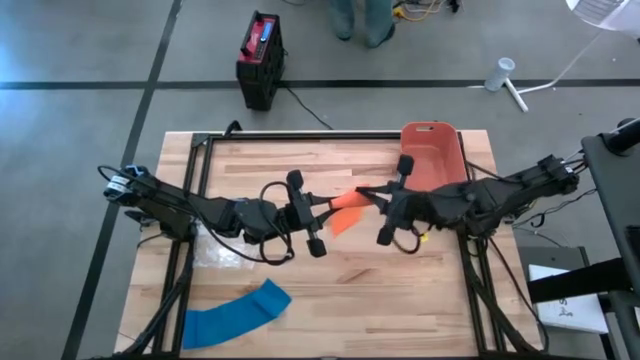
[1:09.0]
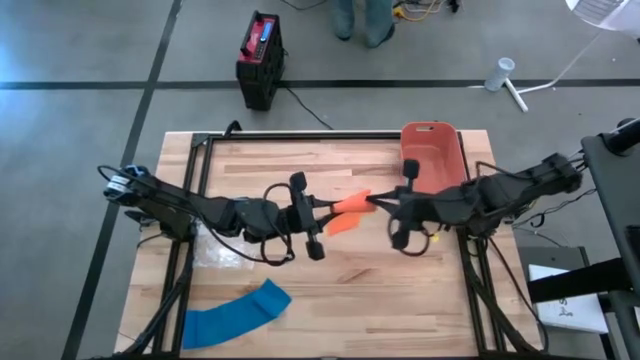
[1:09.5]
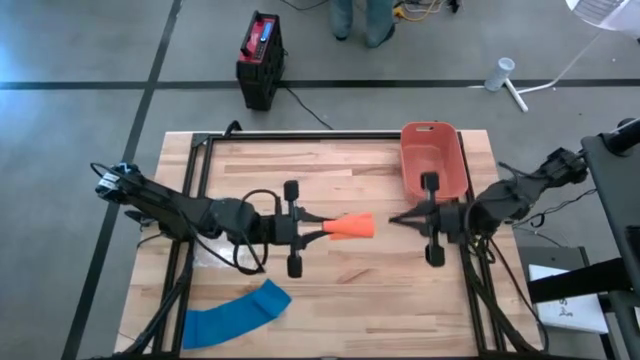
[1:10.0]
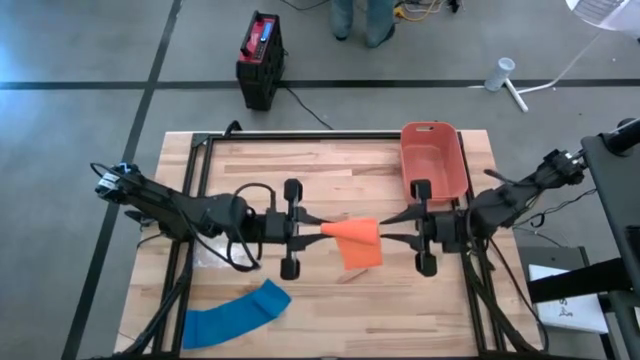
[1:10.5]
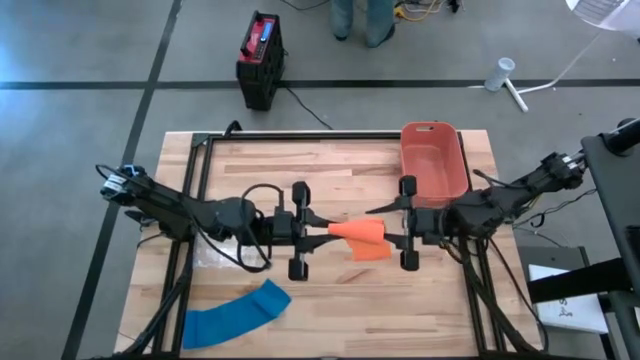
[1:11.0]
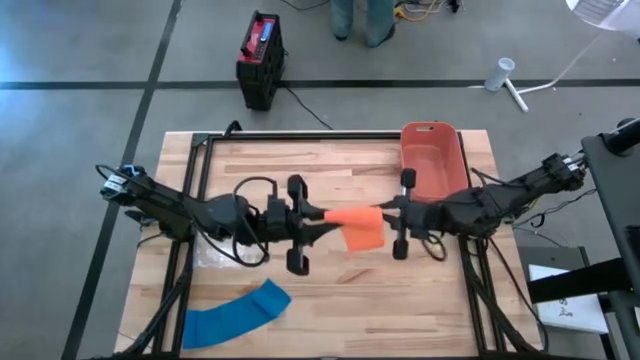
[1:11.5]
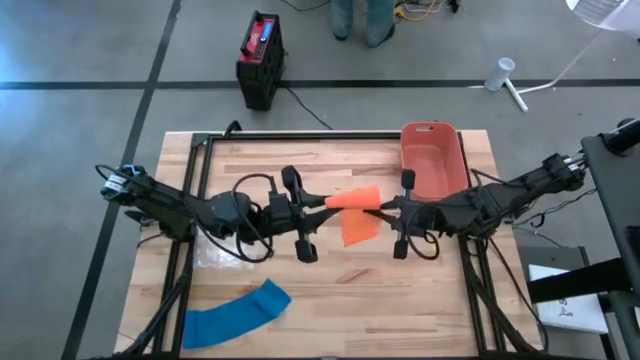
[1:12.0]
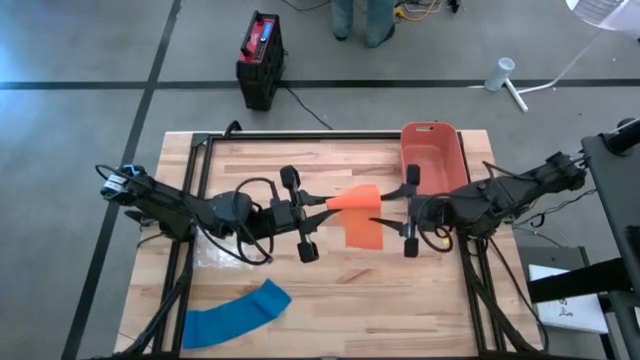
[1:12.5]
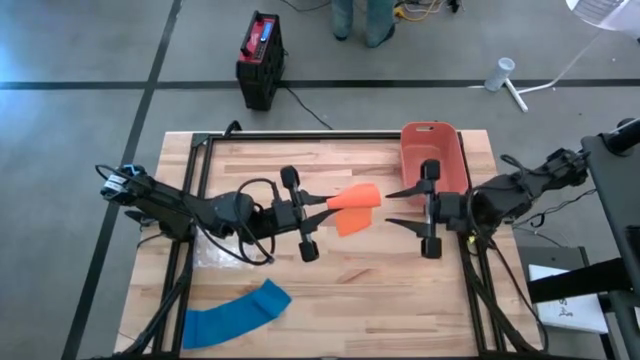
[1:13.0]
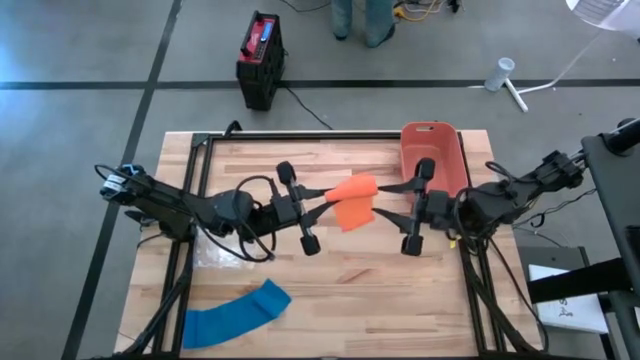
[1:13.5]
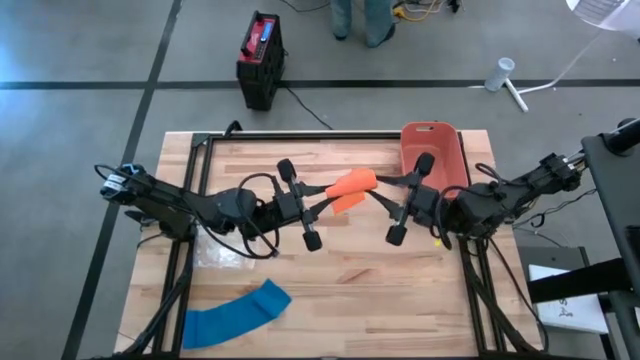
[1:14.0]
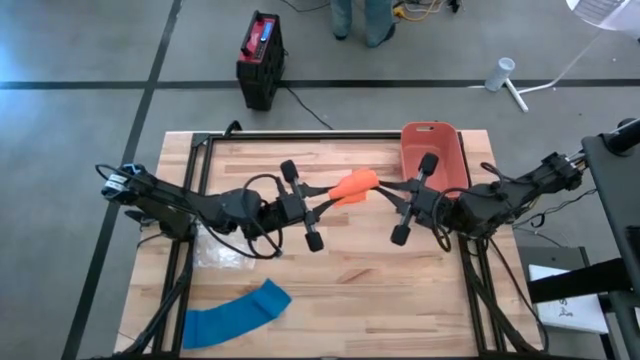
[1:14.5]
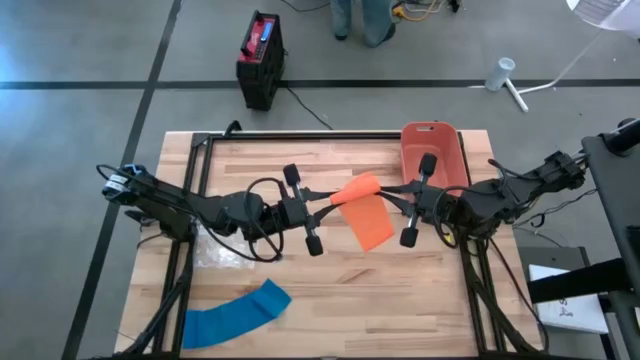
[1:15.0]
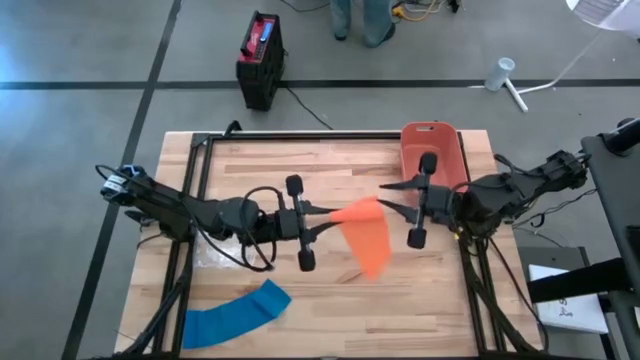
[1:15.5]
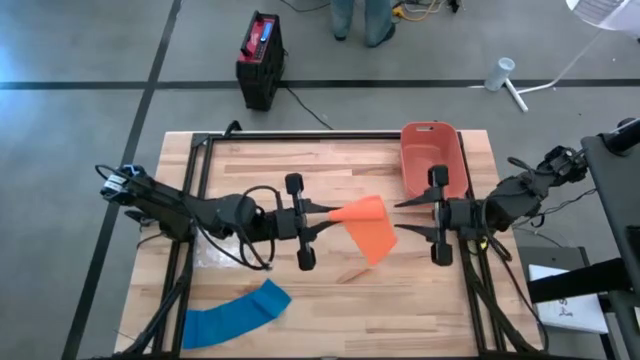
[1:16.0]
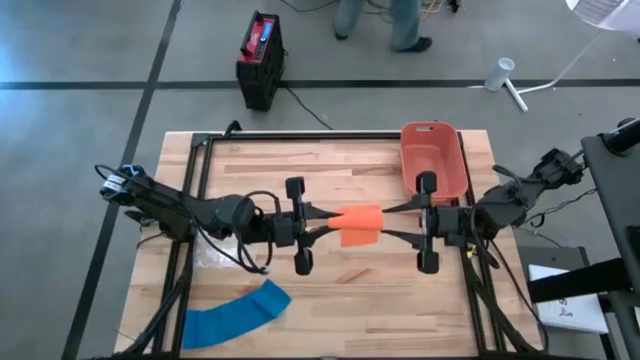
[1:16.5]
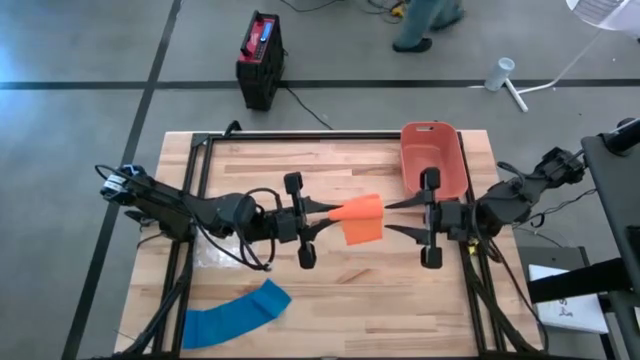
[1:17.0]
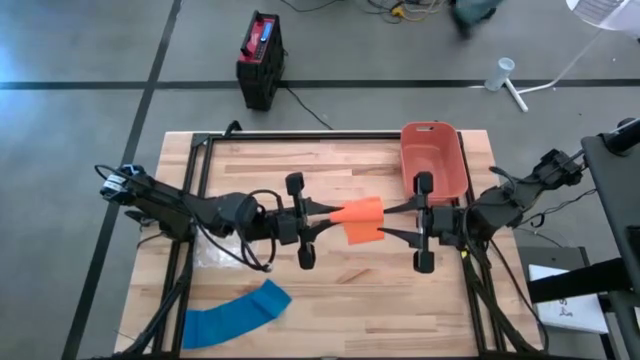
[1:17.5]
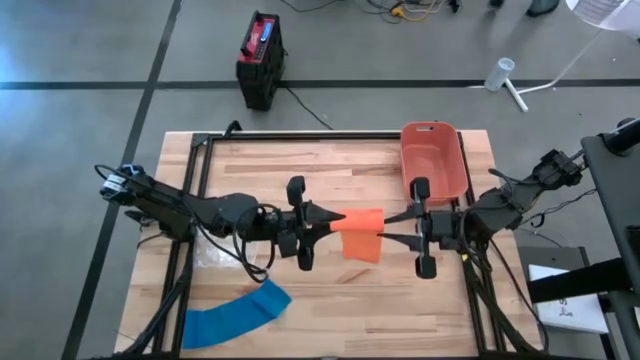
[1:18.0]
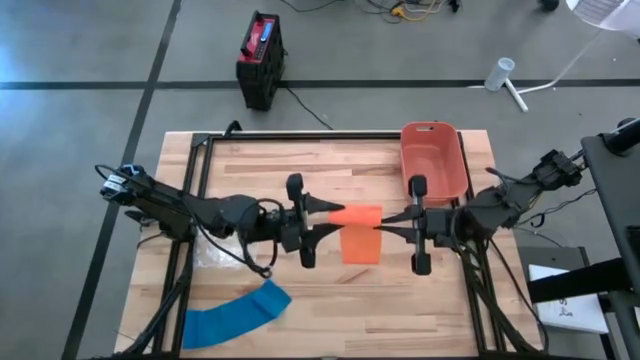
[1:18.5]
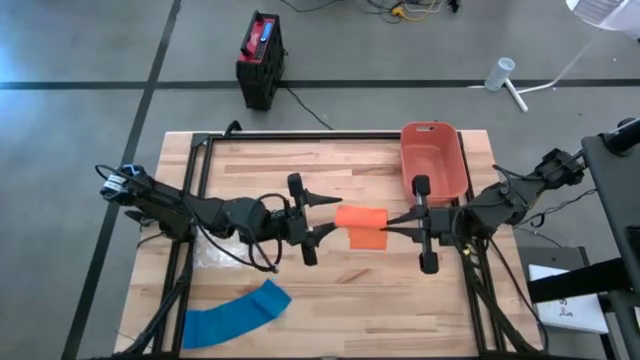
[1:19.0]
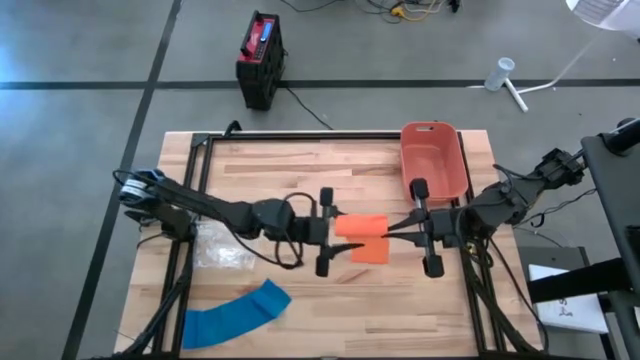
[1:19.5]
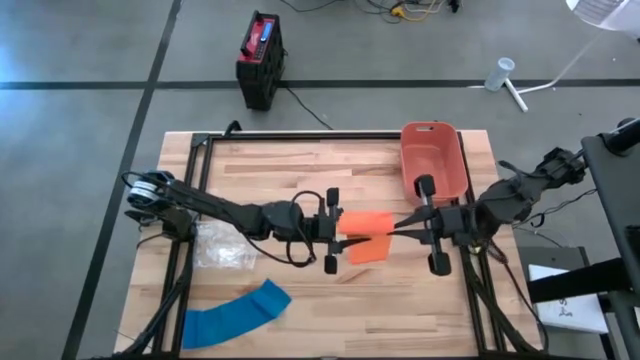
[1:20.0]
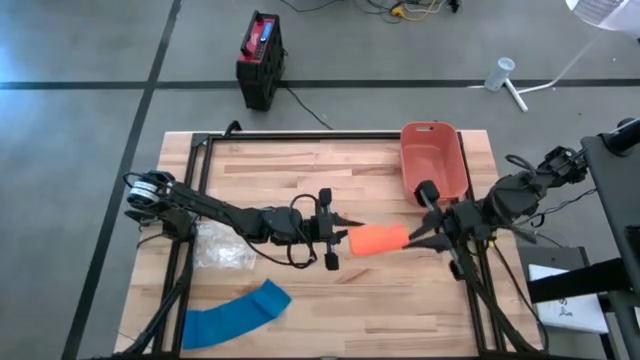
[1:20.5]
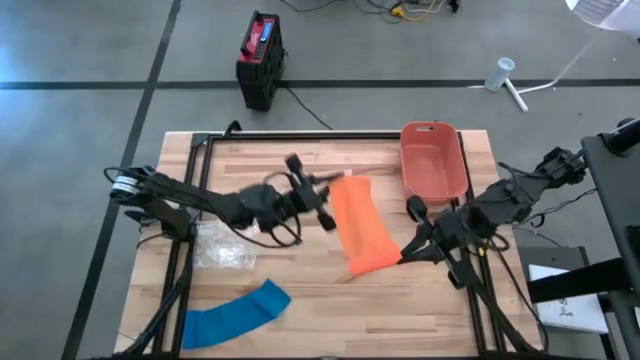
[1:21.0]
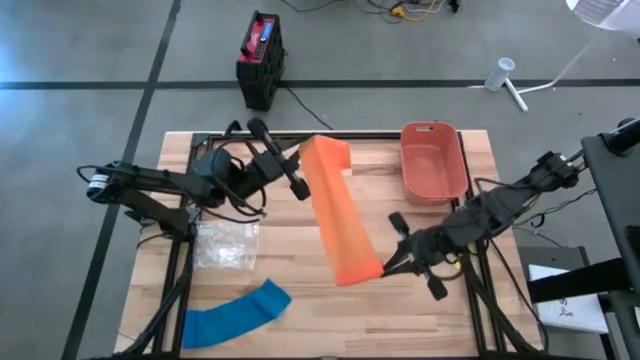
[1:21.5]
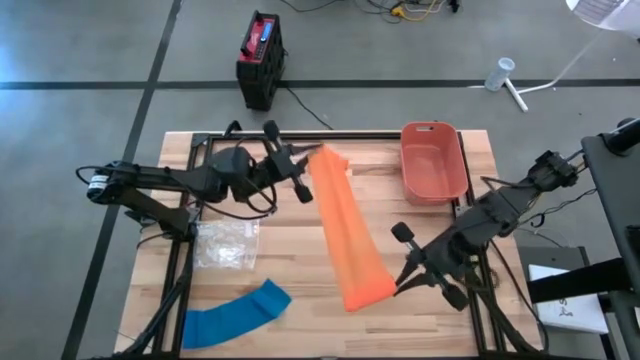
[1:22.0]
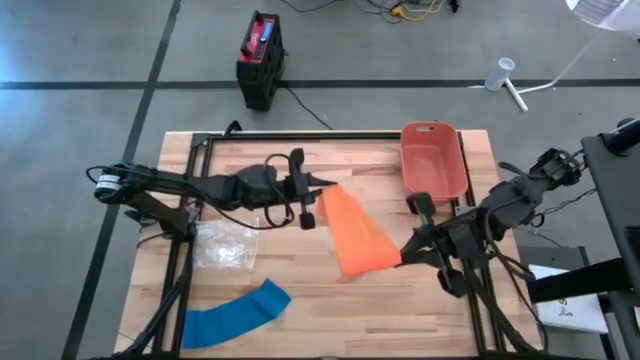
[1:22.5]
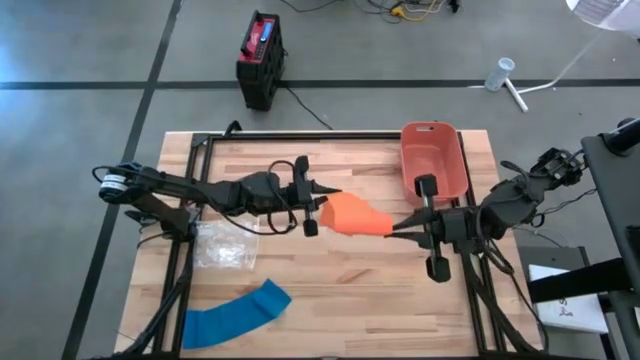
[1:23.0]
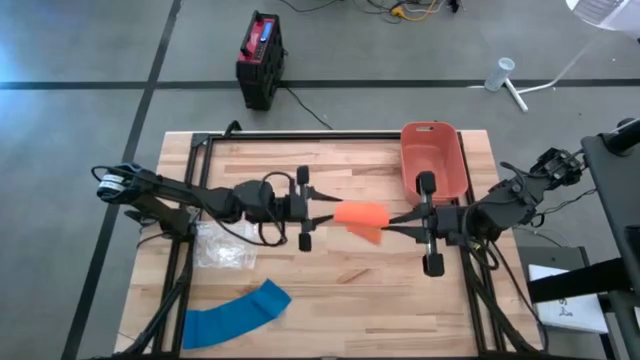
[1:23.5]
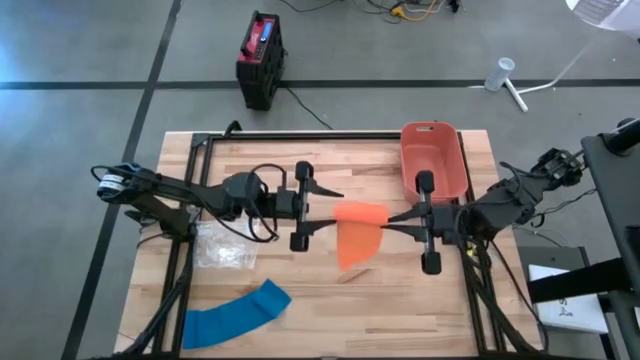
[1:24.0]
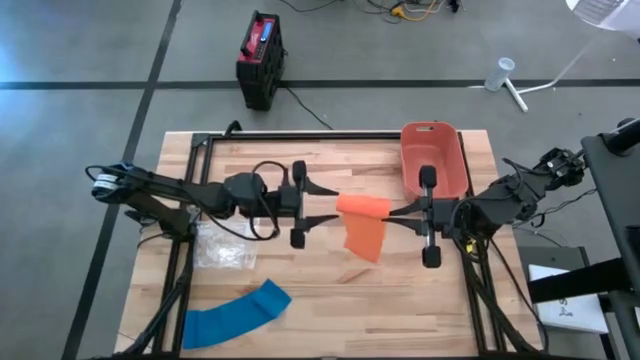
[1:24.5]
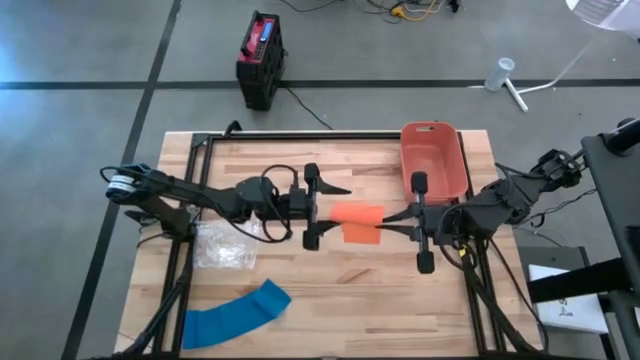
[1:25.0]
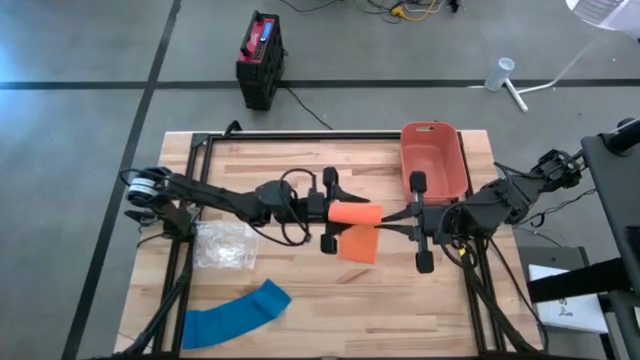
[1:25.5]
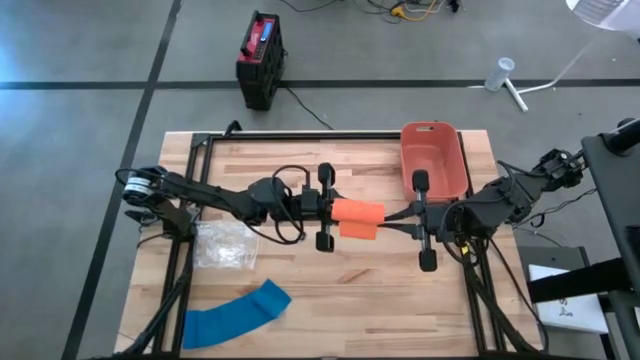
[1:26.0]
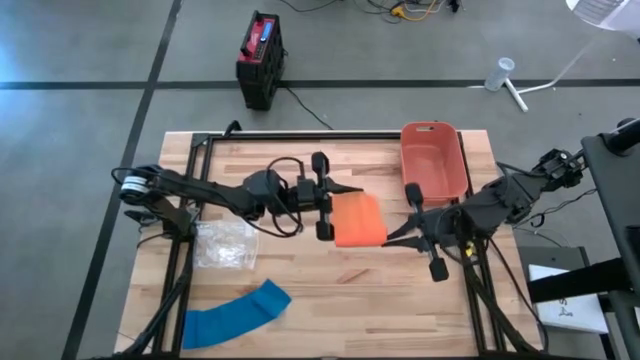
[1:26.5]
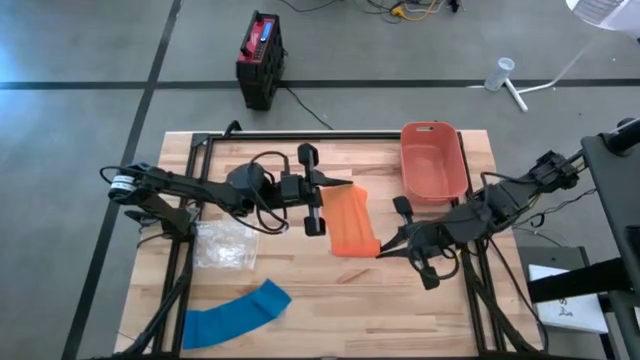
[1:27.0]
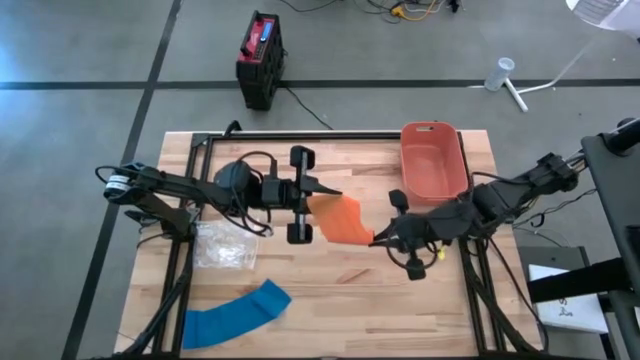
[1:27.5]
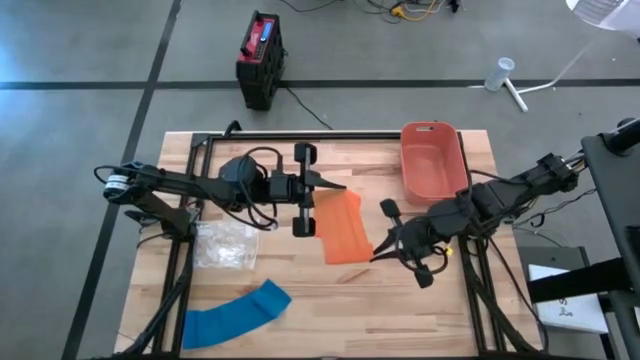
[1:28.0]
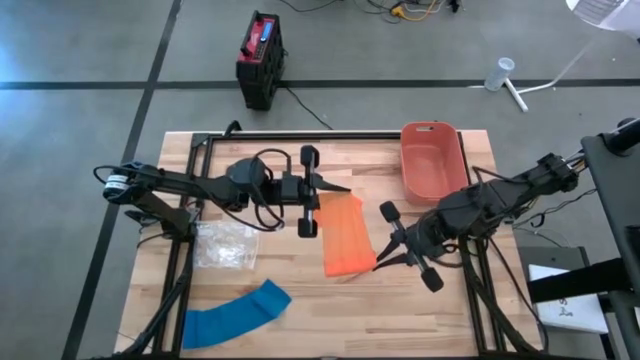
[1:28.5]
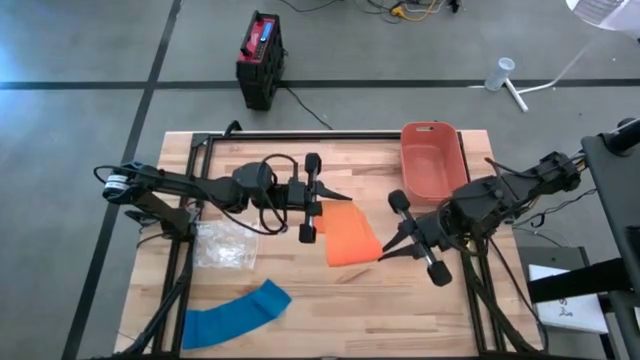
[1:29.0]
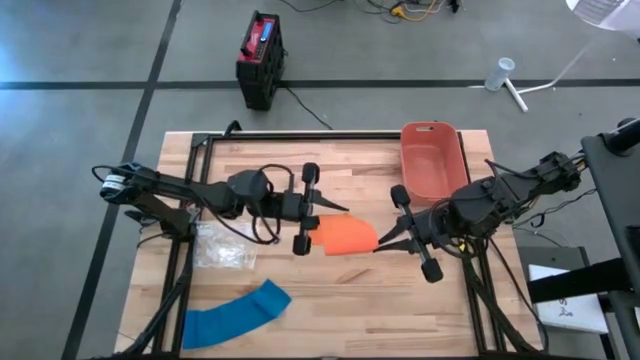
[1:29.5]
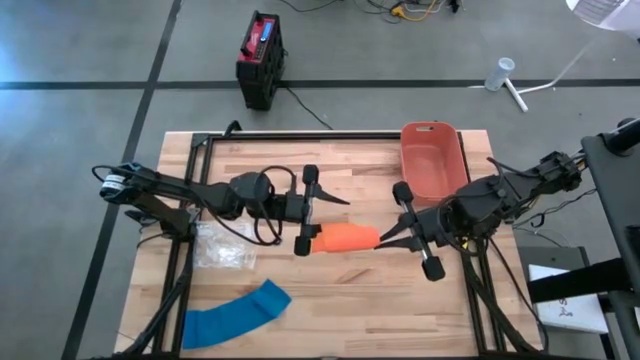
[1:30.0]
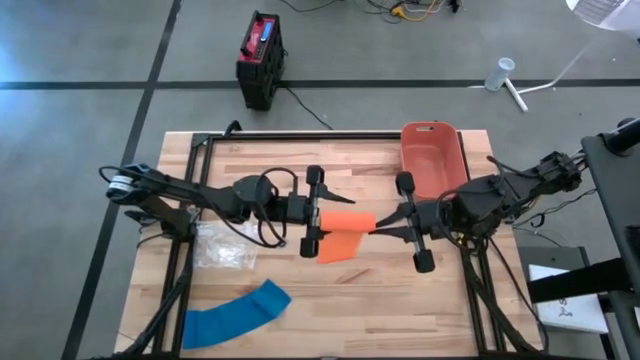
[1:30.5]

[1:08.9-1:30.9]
Task: Roll bandage
Roll the orange bandage
